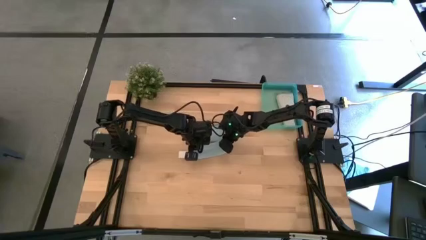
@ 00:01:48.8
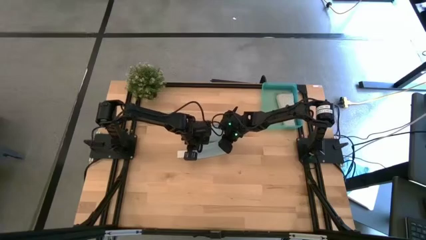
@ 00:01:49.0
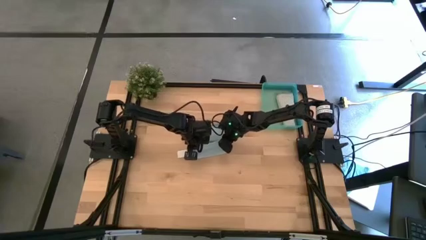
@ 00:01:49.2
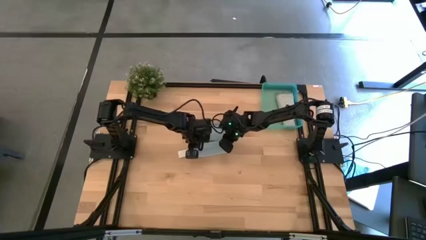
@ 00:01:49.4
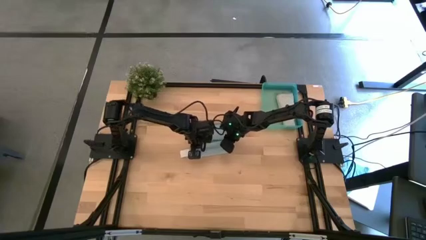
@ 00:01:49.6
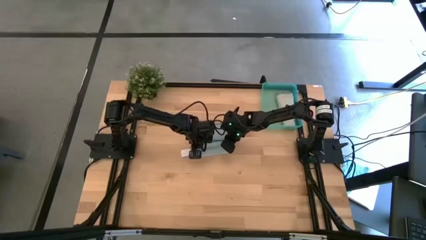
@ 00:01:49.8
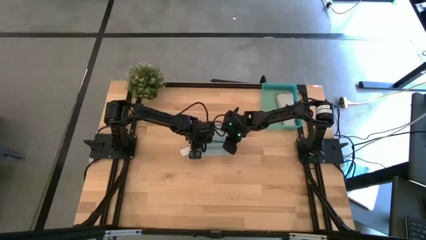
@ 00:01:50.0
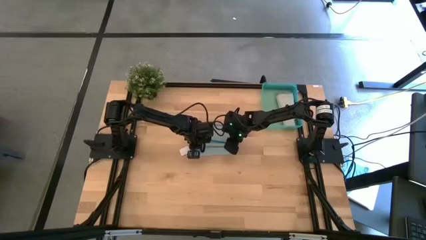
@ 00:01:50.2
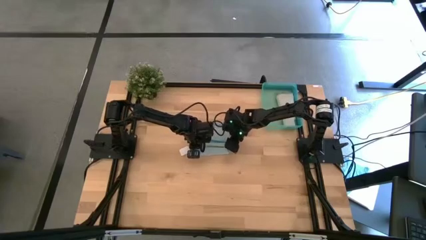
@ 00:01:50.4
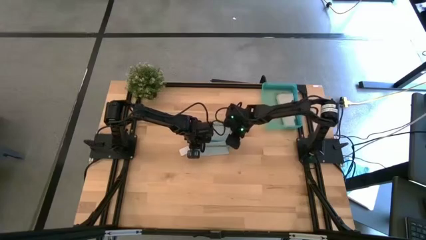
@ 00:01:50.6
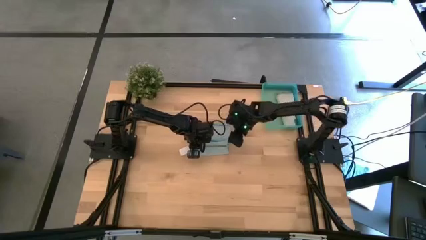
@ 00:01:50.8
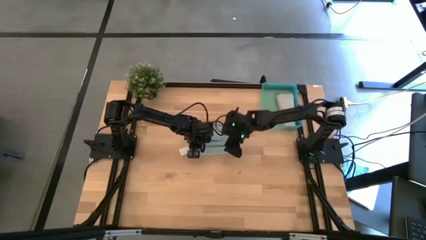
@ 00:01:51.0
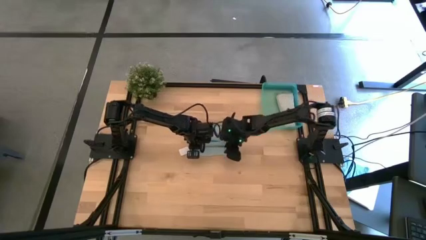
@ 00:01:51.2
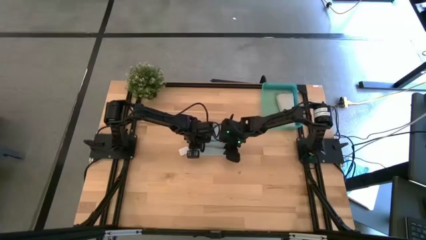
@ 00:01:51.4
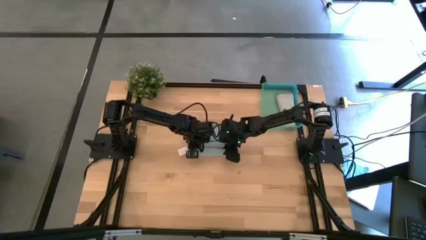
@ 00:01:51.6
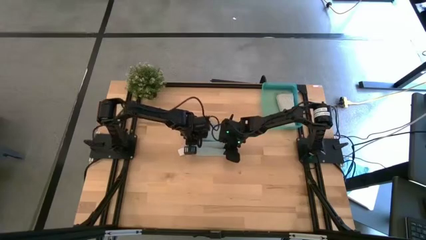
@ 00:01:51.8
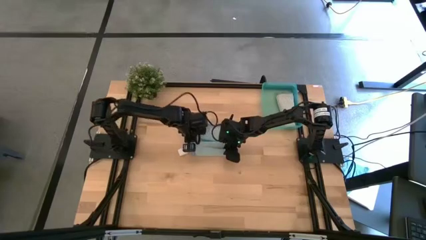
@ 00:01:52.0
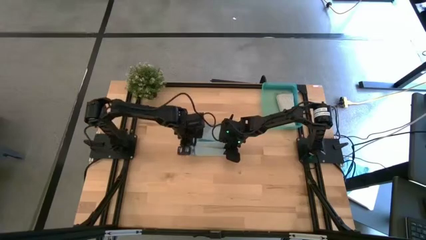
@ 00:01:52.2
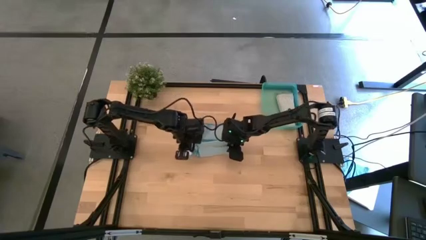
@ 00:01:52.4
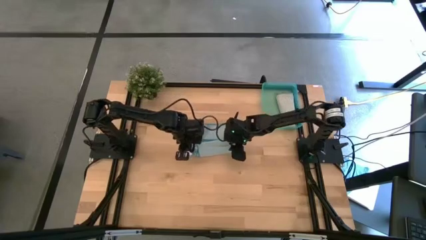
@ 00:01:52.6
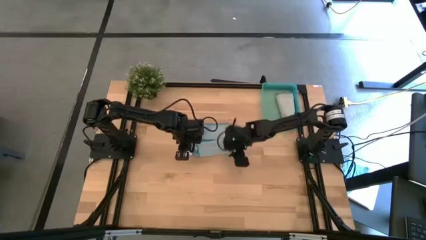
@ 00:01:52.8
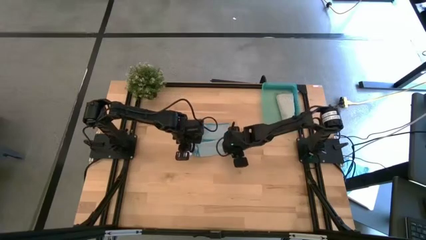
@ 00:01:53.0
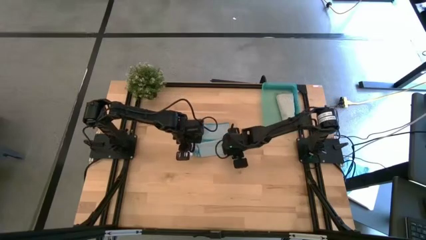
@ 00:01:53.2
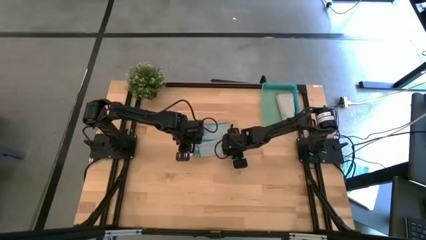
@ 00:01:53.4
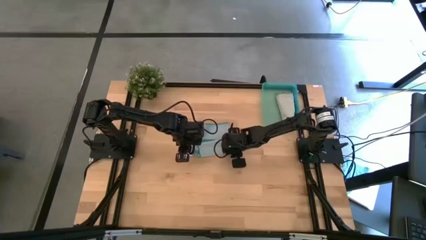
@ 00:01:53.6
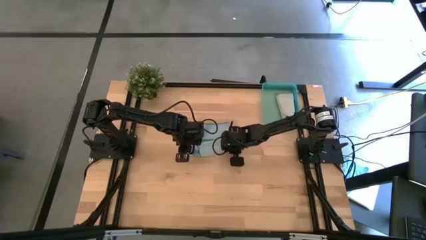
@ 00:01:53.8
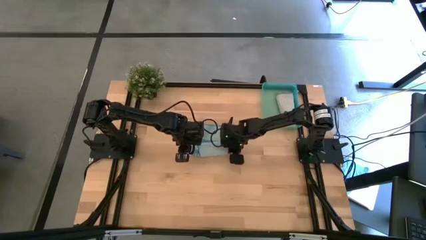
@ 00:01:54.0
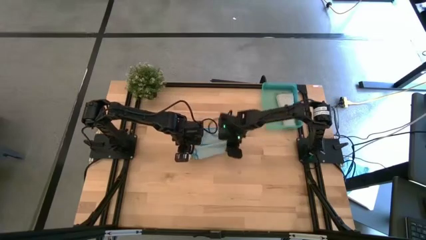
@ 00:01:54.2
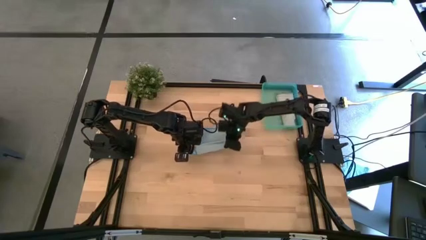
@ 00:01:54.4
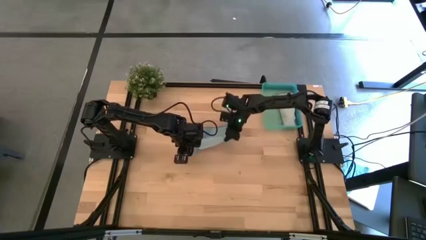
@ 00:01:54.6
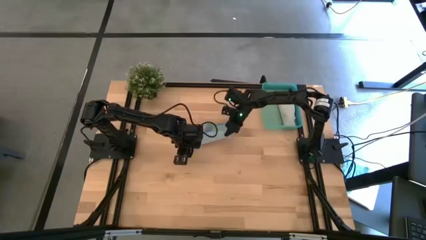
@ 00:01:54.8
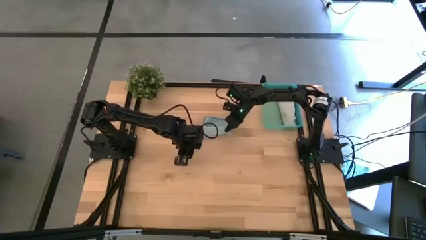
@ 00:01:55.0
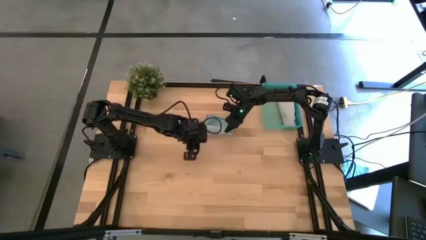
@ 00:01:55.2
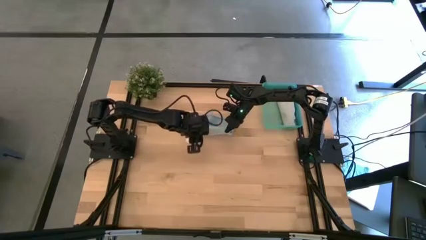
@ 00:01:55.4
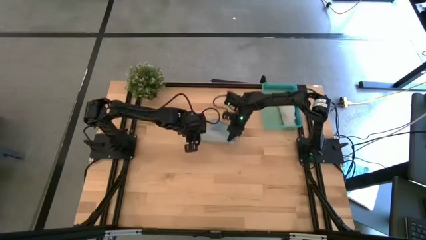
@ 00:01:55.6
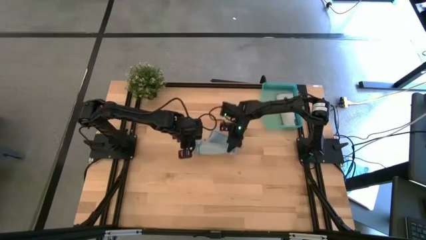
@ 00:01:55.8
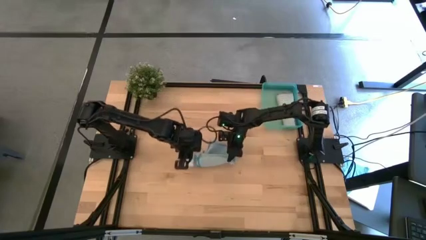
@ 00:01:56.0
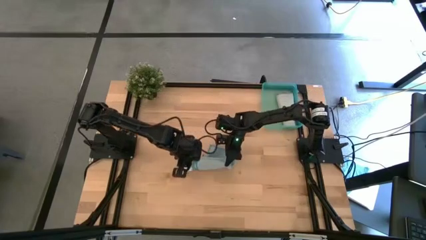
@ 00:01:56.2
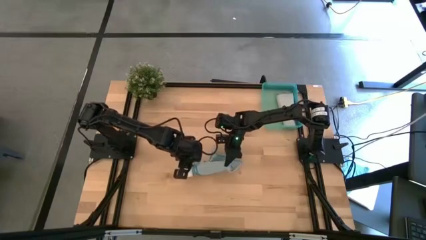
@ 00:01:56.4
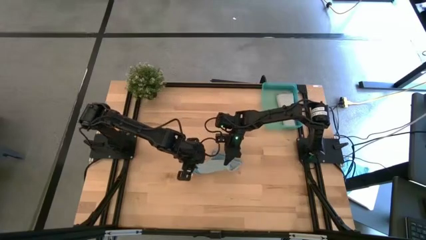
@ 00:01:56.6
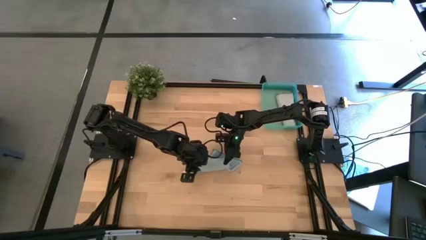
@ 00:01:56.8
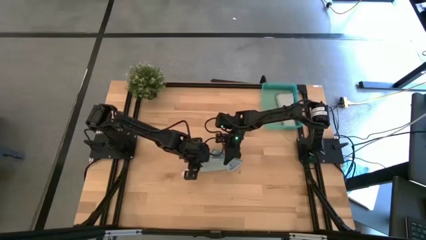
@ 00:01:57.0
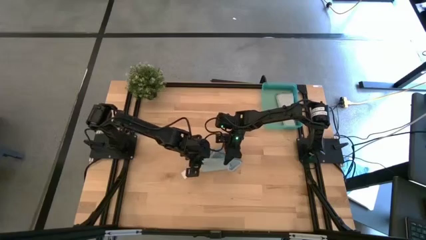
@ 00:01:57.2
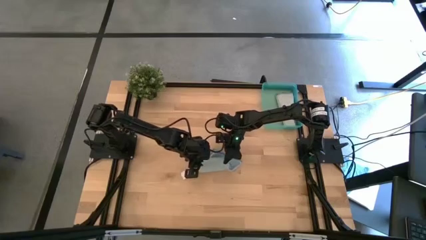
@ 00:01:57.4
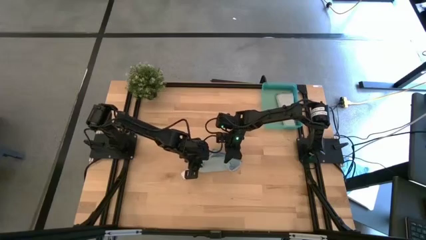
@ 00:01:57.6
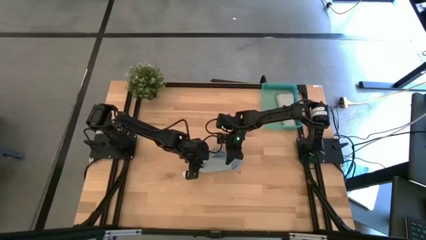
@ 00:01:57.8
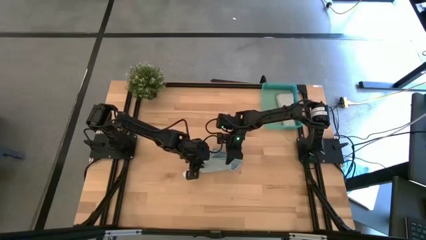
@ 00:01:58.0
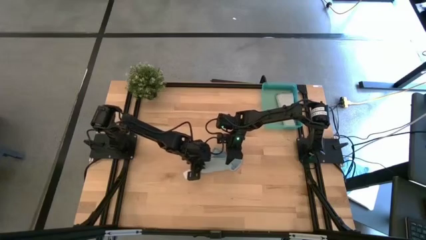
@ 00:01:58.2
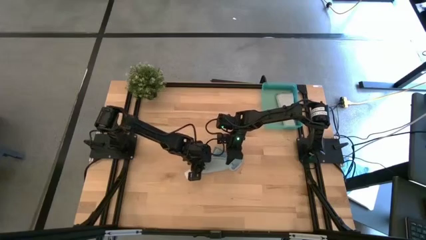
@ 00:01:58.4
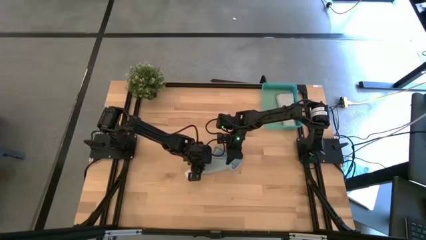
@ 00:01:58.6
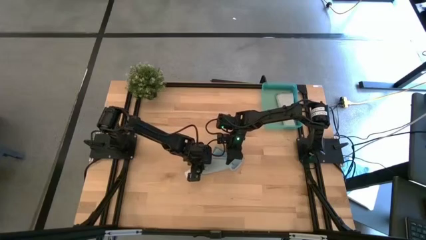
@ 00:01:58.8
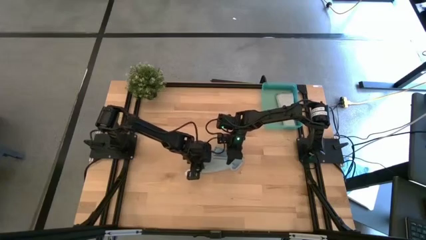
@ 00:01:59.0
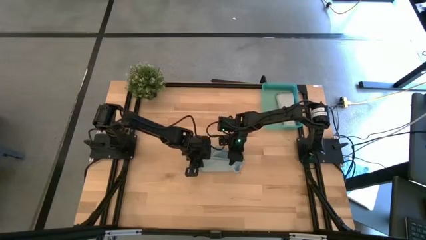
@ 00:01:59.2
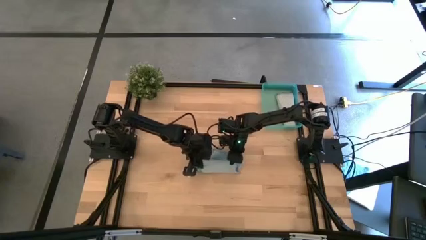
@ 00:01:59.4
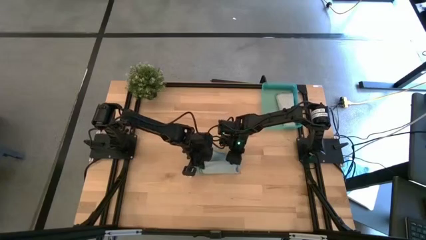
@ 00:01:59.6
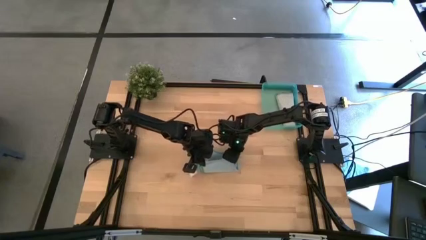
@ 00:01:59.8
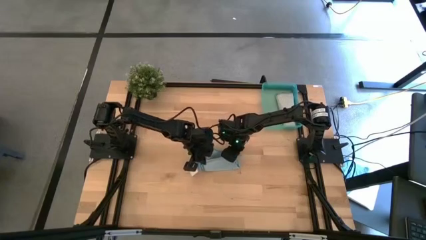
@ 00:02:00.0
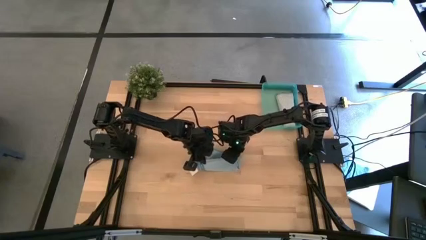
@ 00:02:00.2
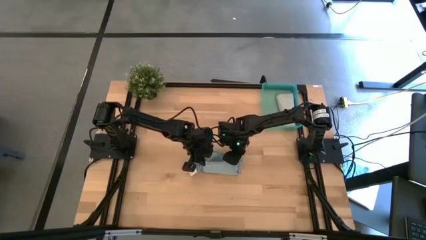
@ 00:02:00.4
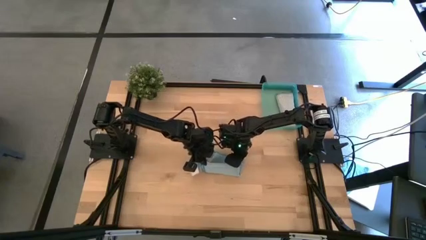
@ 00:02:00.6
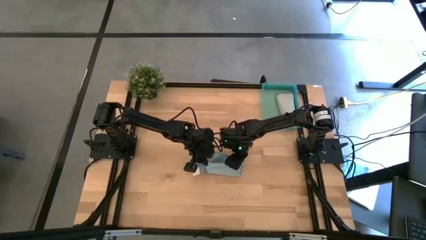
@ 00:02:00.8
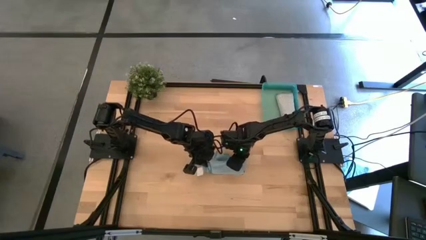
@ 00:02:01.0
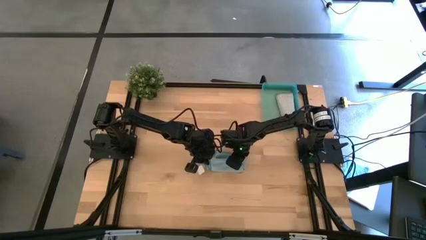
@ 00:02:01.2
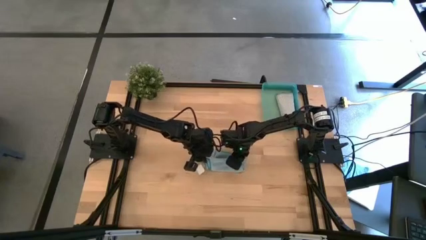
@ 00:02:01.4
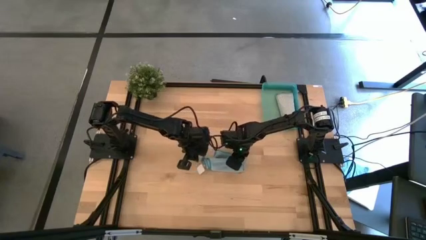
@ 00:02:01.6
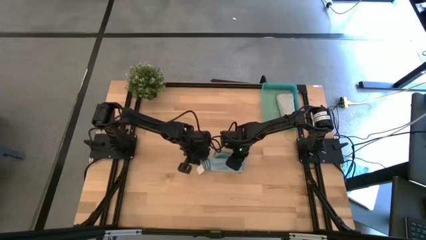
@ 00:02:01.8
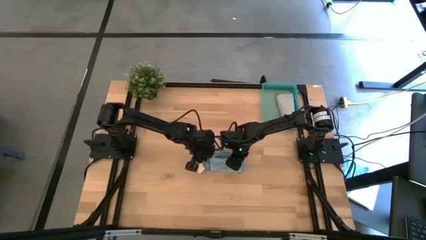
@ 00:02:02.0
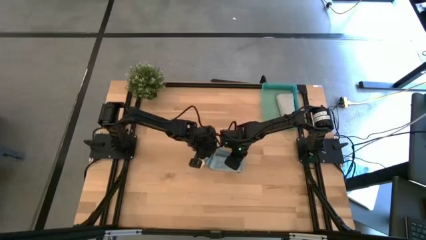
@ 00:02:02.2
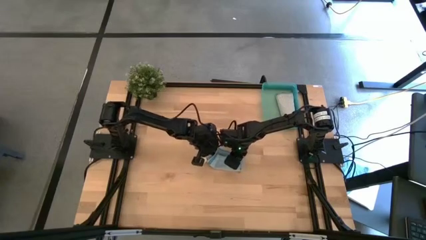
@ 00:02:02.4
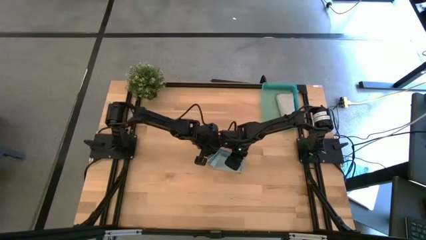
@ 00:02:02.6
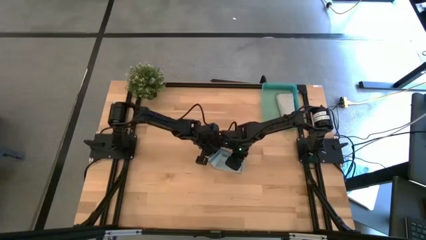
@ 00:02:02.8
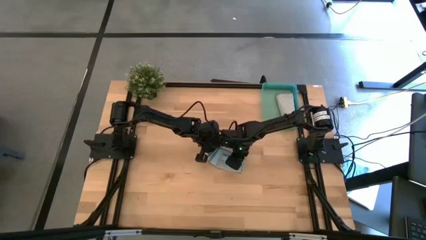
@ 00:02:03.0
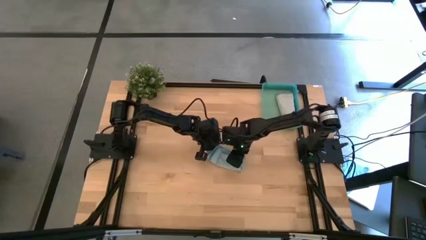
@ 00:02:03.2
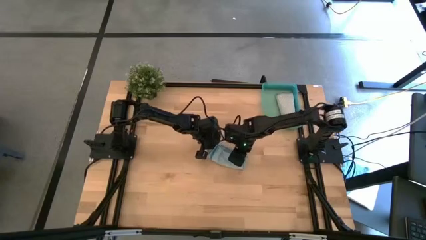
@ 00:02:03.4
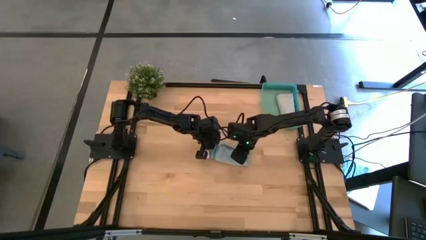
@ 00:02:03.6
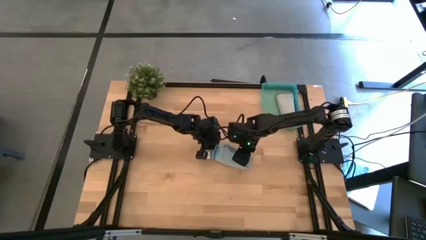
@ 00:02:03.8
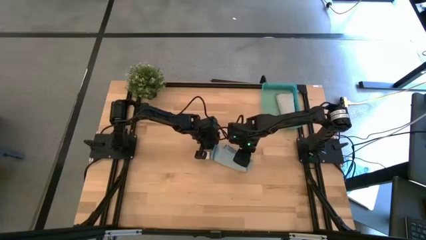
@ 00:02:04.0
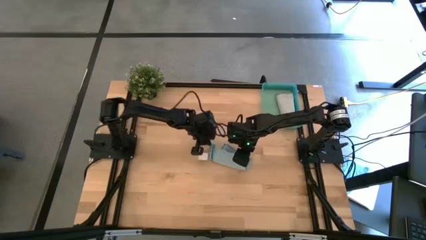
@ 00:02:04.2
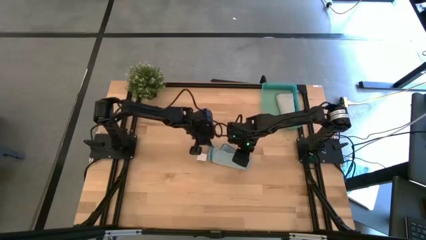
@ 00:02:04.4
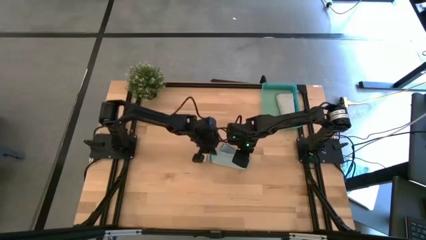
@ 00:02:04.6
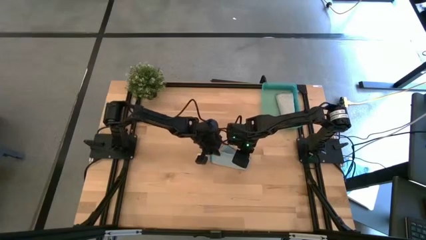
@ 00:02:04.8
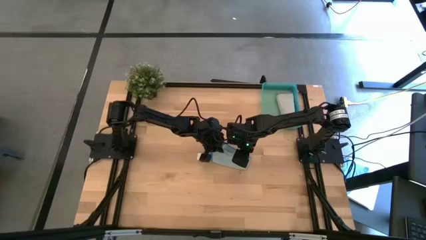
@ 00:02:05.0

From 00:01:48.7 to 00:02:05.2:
Task: Roll microfiber towels into tight, uniform cylinder then place into a basket
Roll the blue towel
